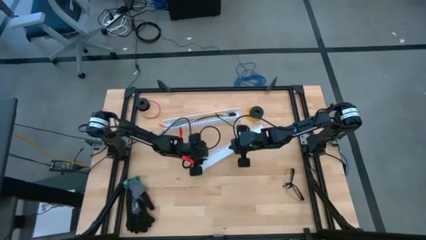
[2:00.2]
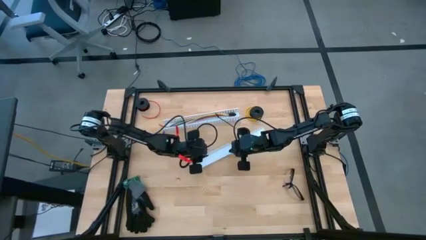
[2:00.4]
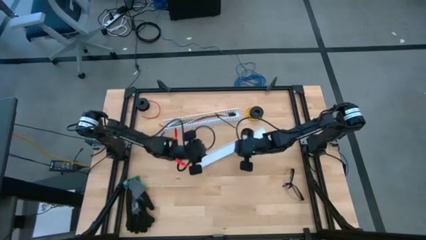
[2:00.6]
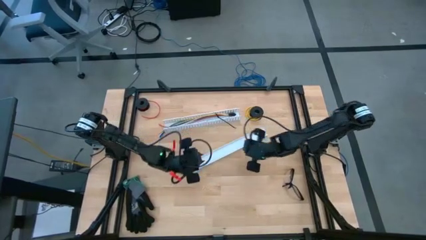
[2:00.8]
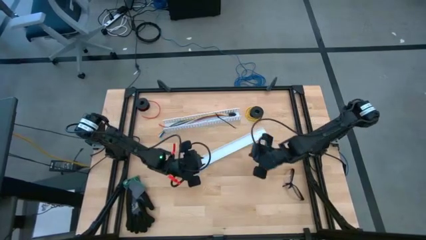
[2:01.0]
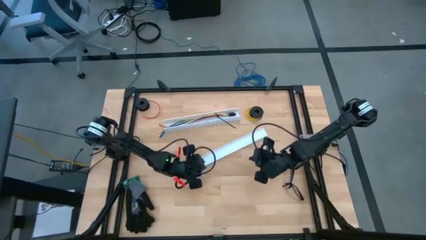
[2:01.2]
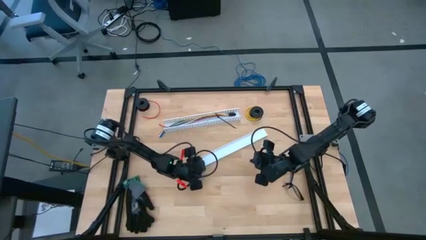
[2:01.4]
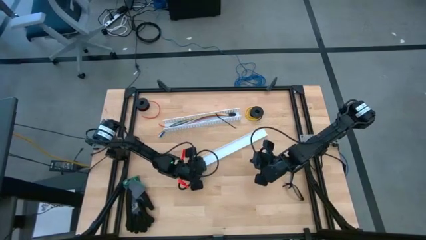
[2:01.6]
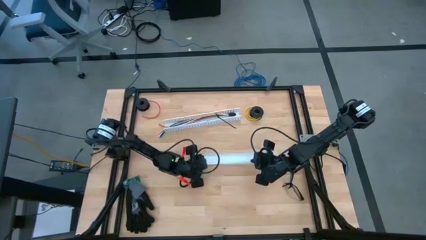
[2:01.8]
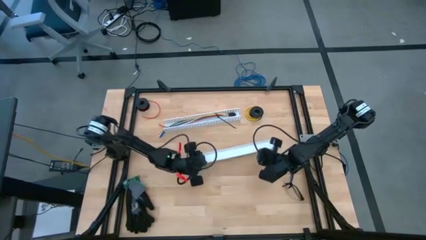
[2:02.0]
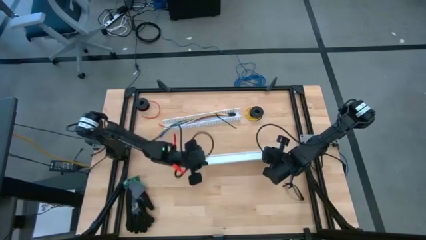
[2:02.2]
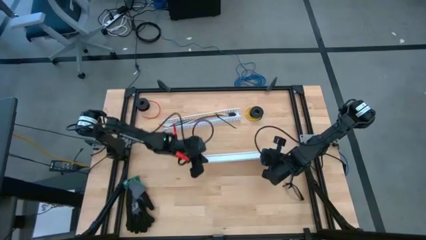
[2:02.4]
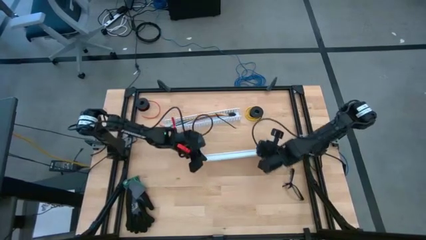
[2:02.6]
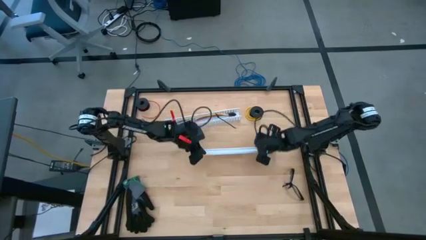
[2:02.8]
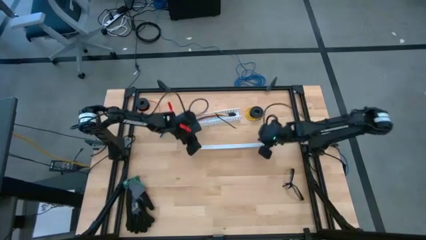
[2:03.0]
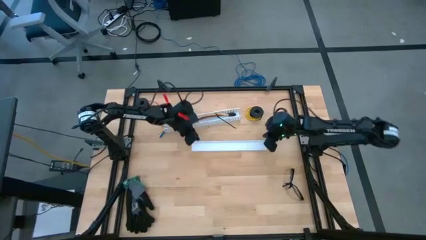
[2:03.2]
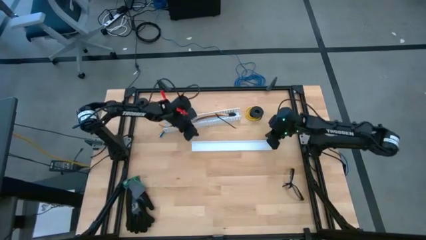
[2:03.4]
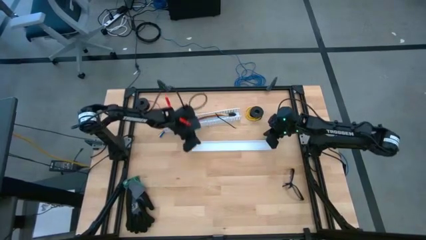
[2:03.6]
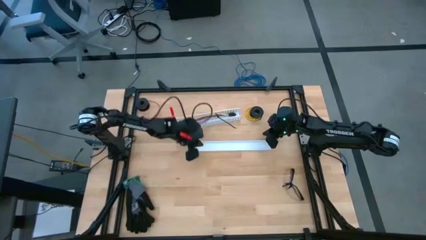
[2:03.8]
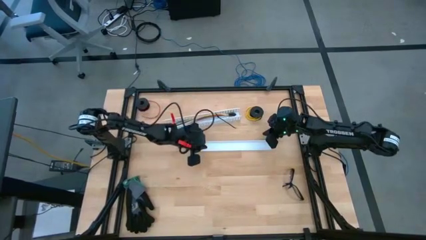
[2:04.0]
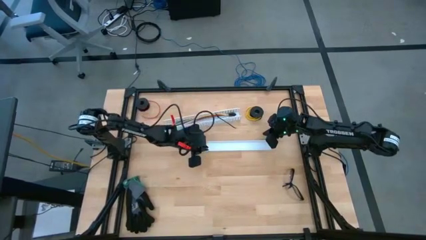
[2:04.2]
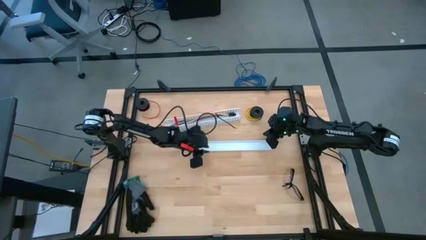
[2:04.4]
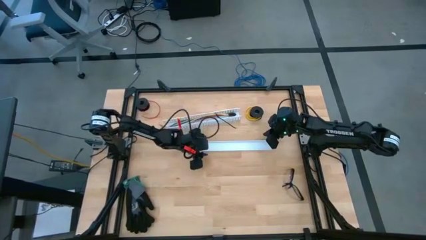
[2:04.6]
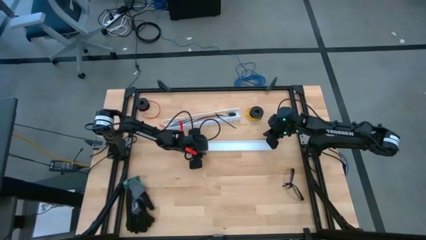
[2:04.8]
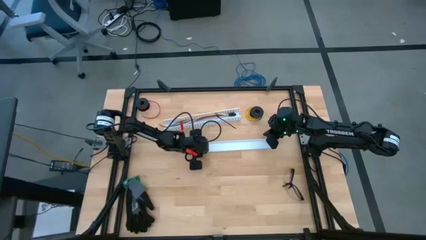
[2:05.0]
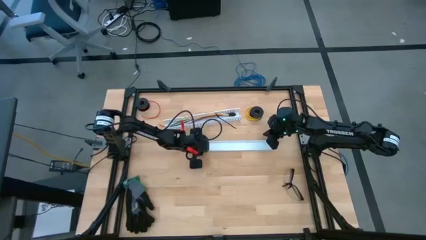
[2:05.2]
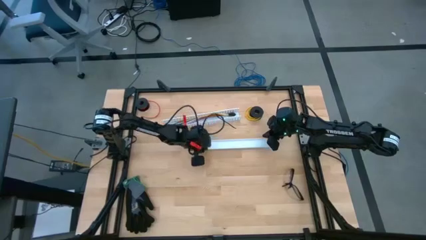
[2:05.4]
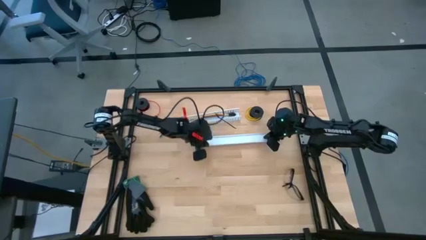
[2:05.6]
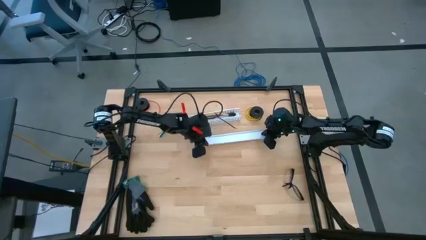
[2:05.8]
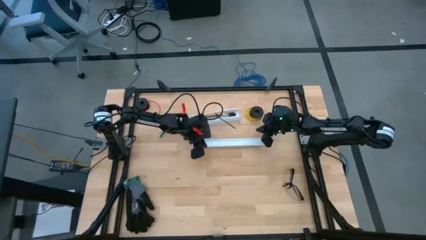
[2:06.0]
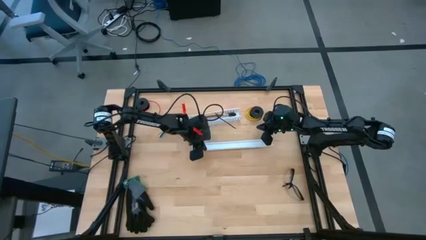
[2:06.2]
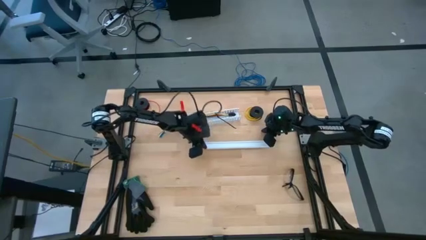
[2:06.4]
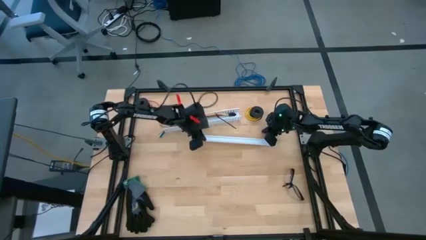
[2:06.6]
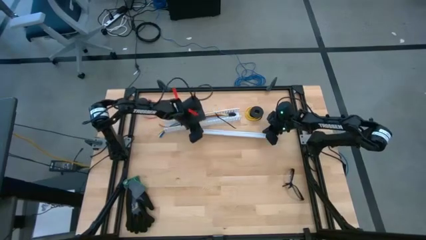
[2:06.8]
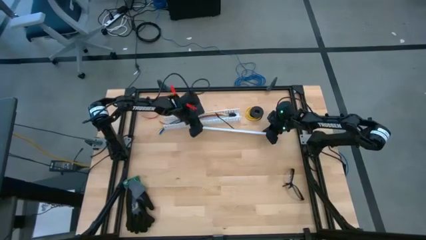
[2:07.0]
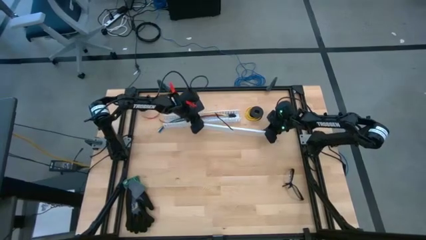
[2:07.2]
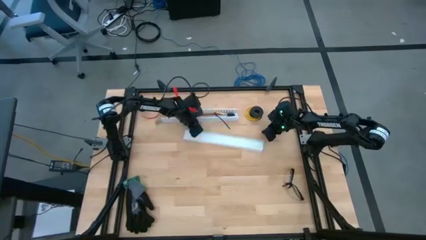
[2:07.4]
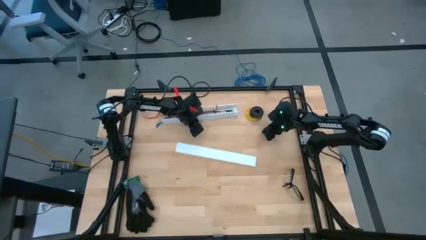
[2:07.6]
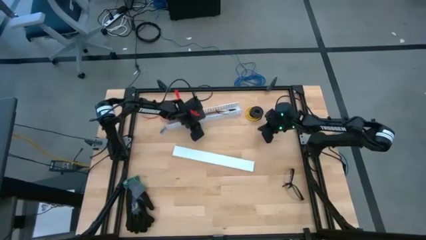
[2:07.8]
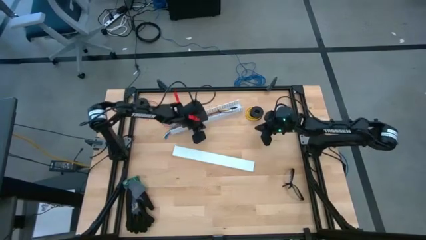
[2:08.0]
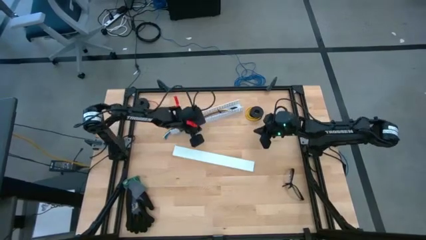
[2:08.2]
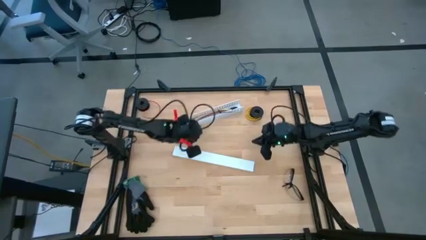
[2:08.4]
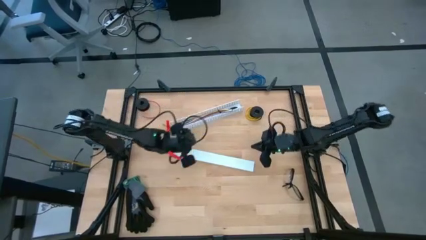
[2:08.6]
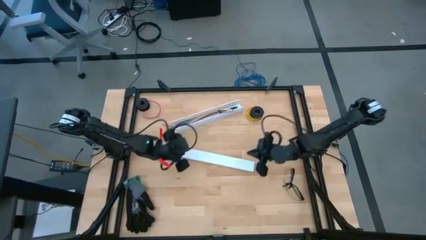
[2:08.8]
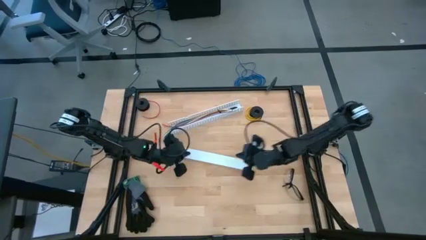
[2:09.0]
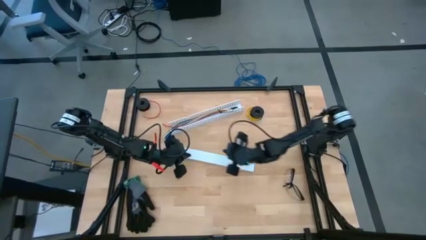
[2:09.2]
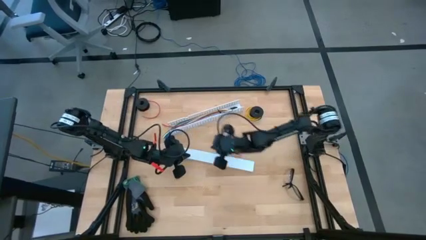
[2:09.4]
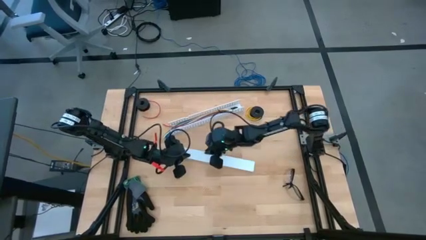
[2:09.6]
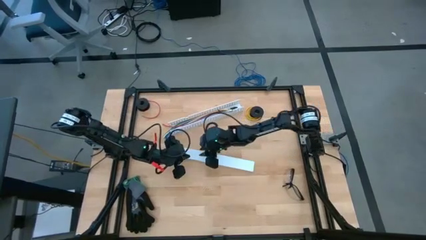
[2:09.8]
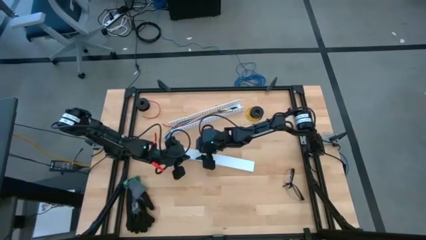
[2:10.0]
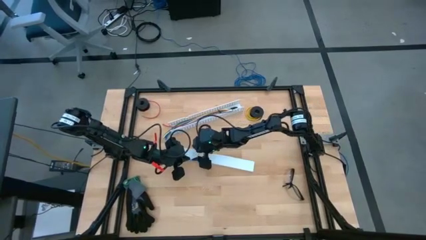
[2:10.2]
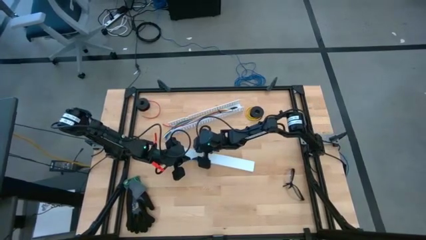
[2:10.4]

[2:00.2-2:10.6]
Task: Ziptie cables
Close the white cable duct
